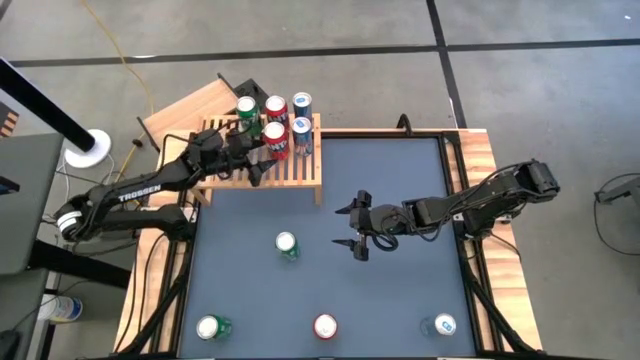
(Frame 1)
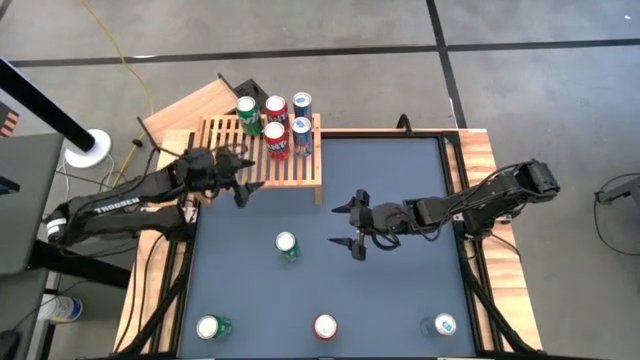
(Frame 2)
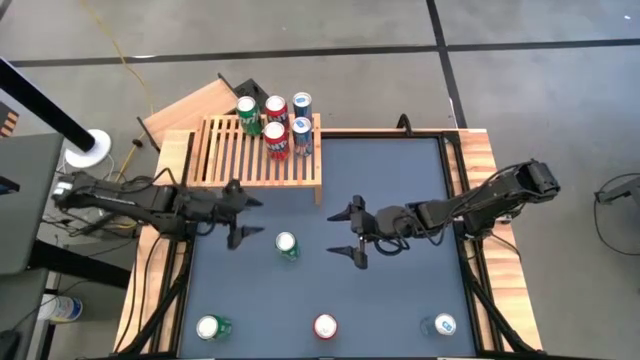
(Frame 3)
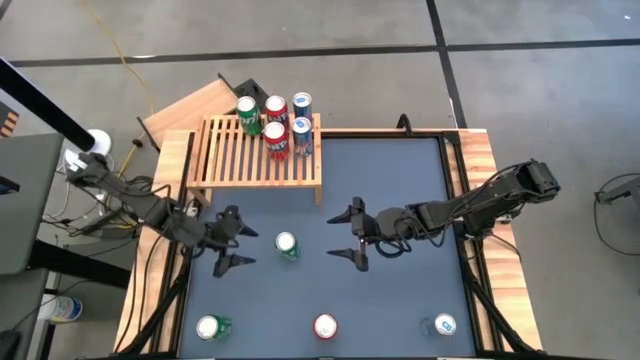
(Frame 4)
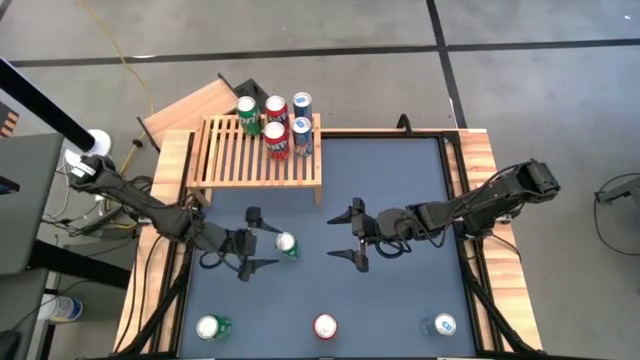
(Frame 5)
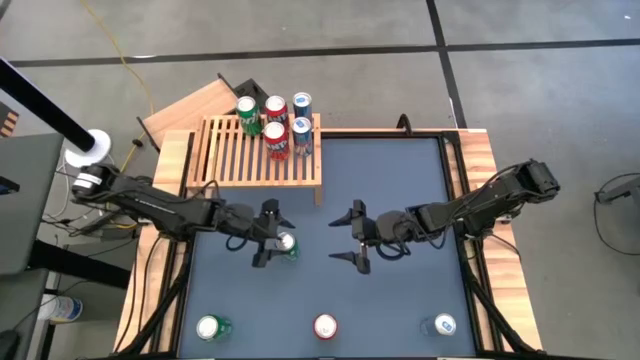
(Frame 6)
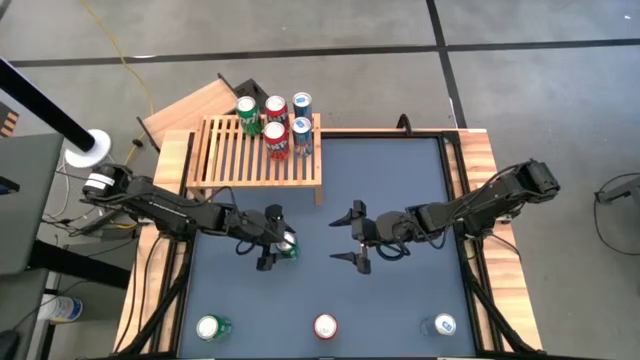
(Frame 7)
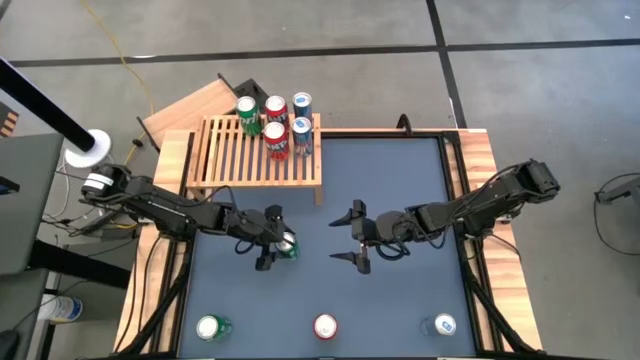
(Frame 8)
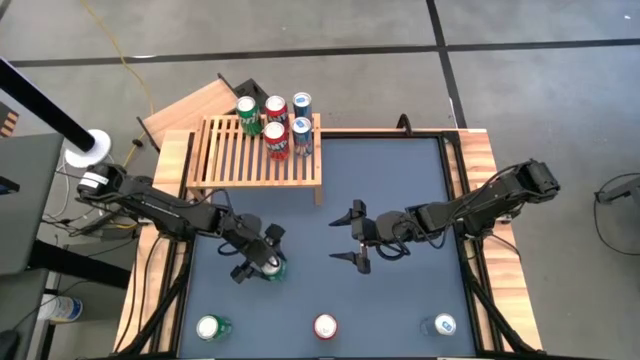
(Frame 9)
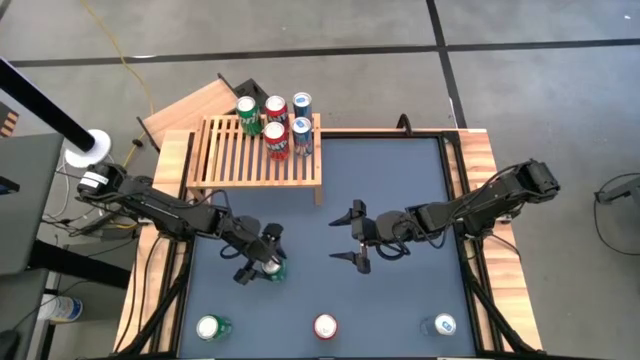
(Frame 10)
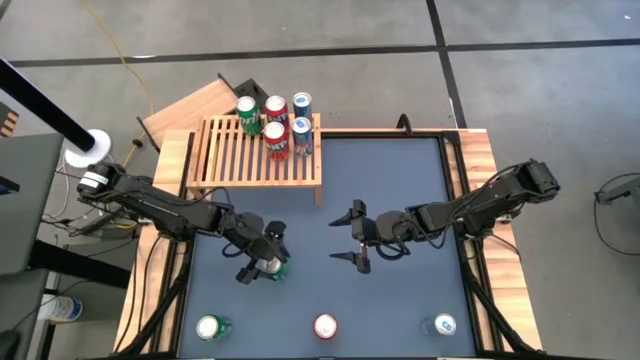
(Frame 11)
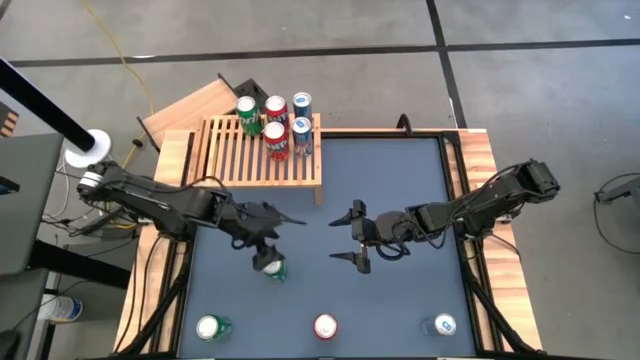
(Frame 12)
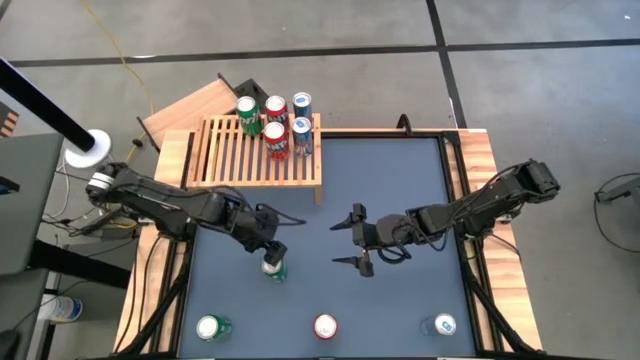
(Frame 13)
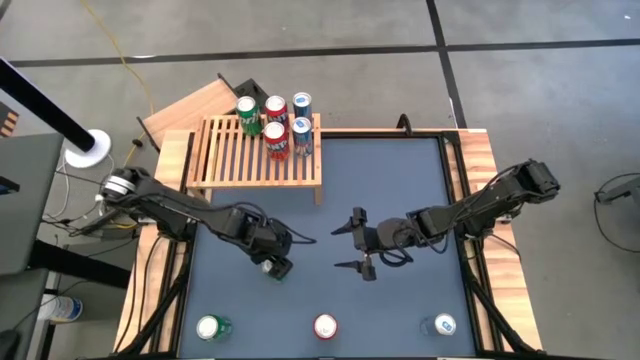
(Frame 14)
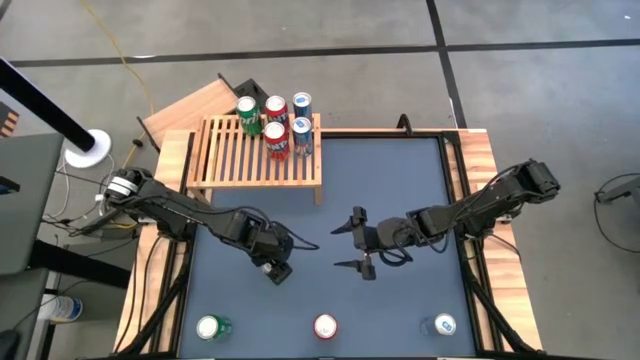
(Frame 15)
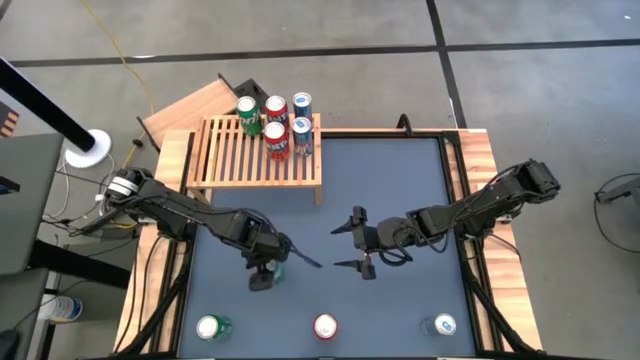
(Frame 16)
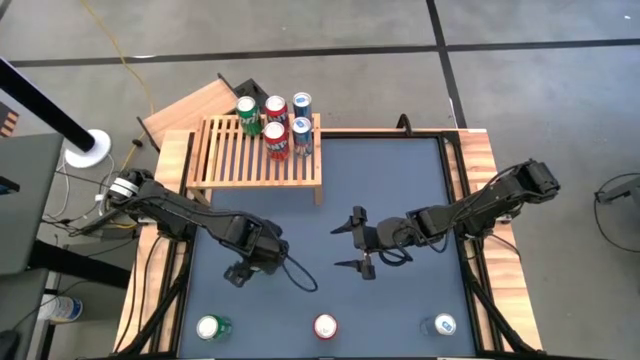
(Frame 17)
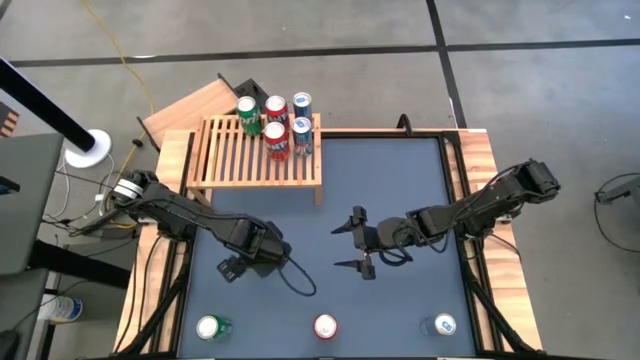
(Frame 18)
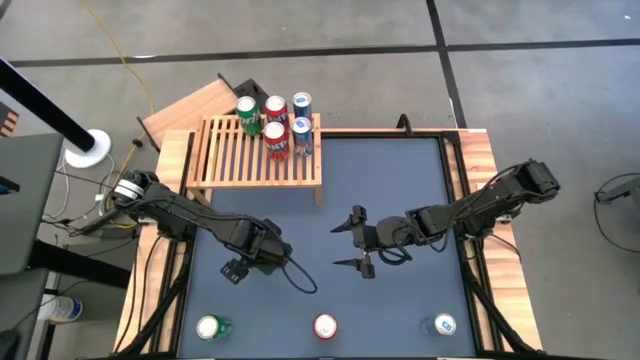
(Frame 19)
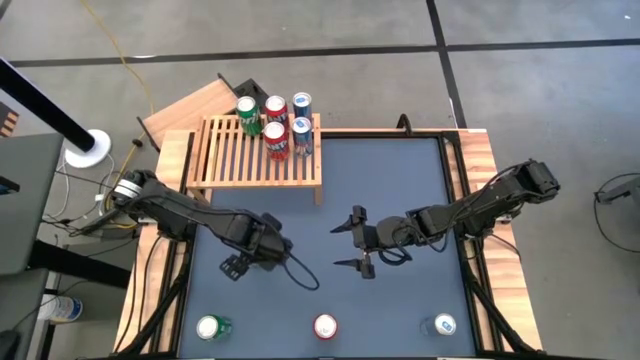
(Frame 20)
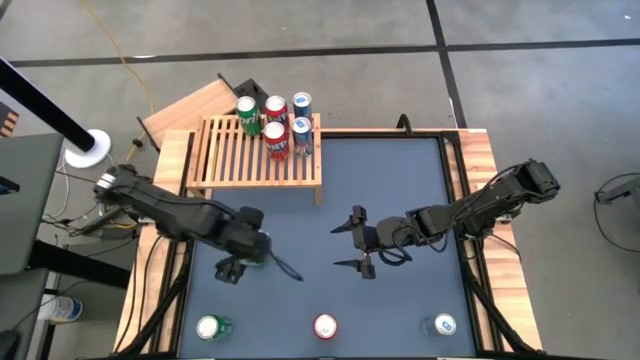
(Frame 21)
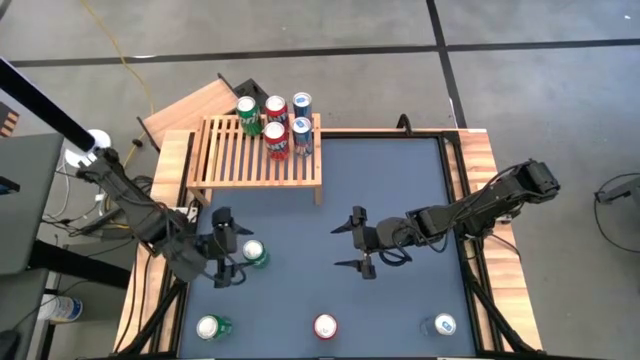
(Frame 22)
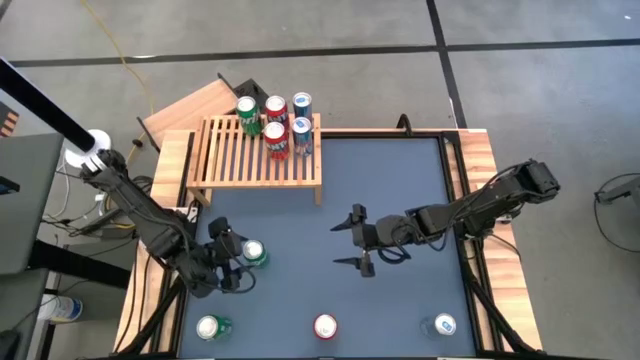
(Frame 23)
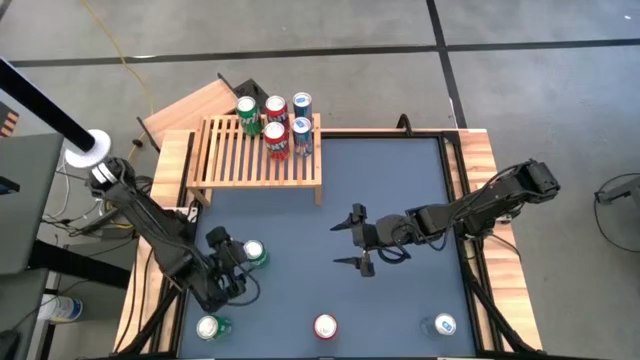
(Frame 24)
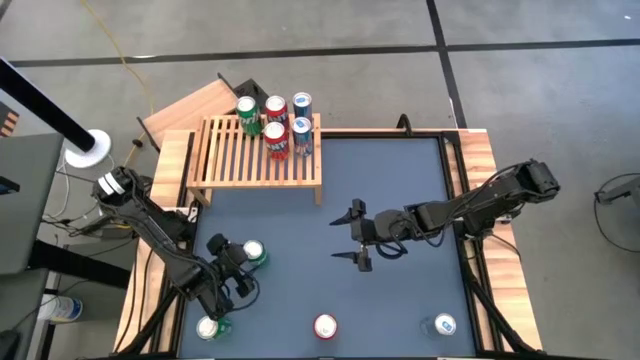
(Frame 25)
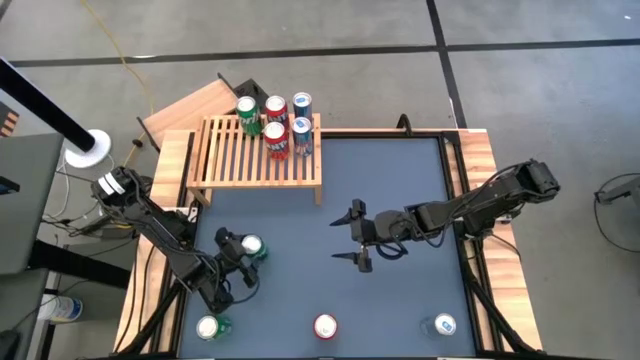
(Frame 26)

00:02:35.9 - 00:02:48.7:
Task: Place canned beverage on shelf
Put the top green soda can on the shelf aligned with the other green soda can
